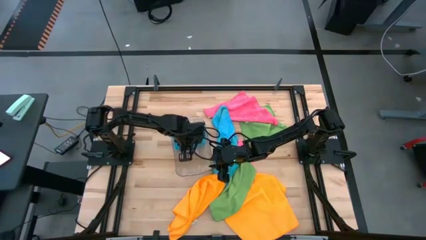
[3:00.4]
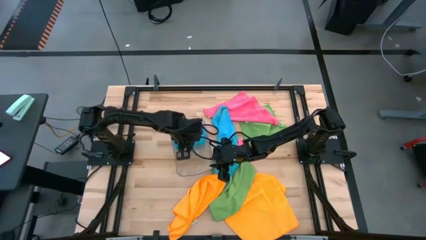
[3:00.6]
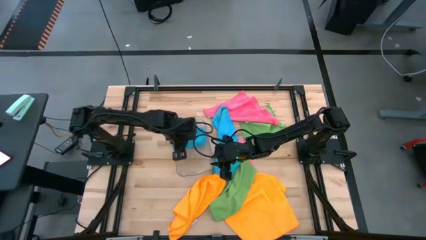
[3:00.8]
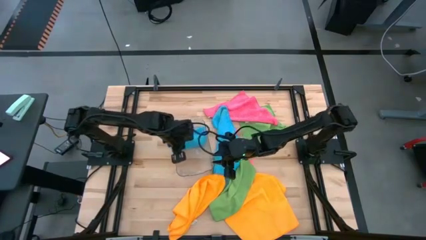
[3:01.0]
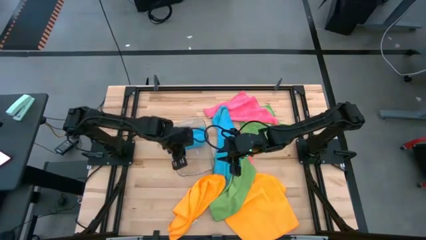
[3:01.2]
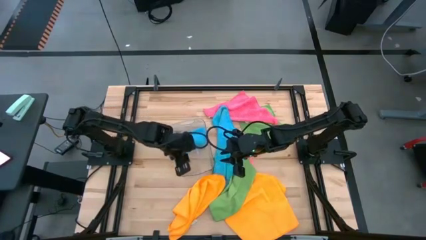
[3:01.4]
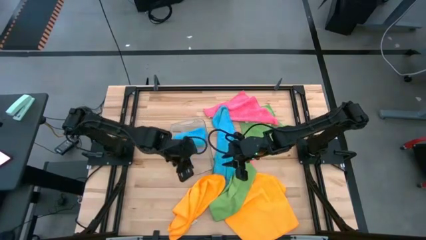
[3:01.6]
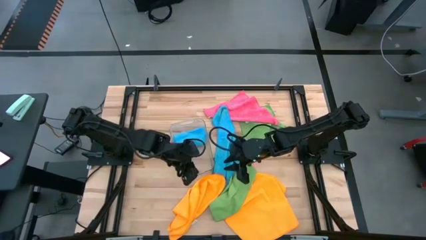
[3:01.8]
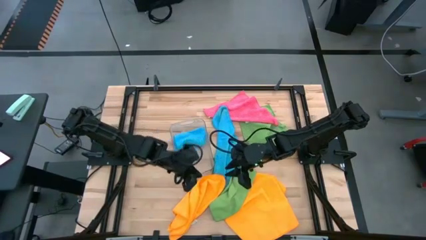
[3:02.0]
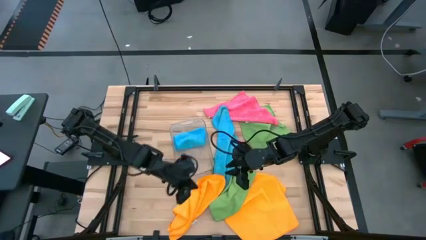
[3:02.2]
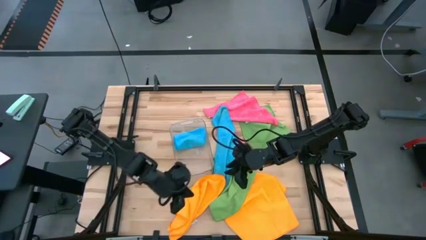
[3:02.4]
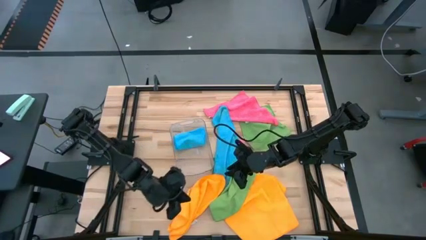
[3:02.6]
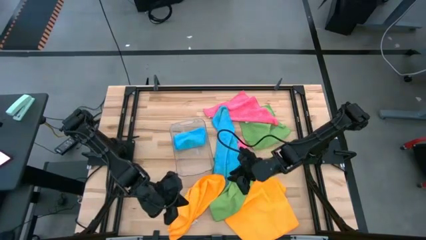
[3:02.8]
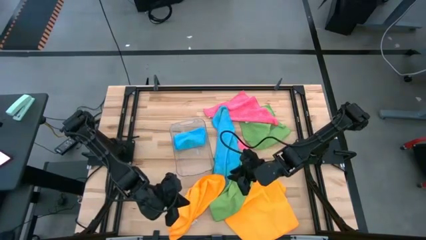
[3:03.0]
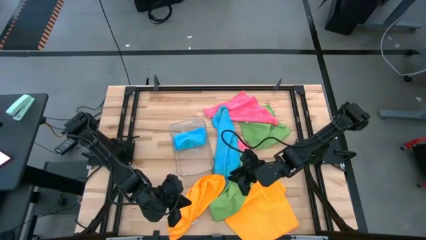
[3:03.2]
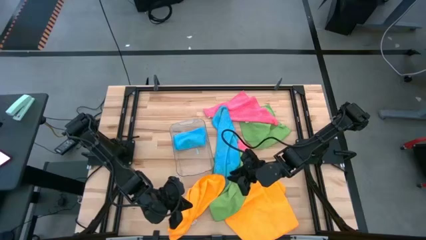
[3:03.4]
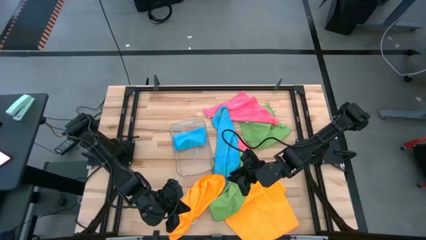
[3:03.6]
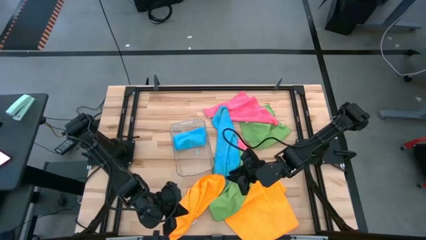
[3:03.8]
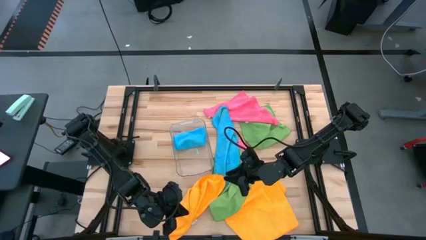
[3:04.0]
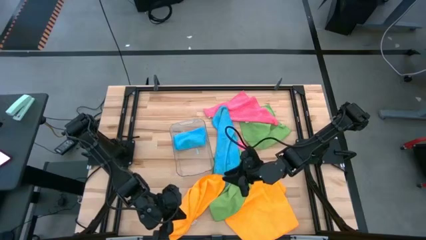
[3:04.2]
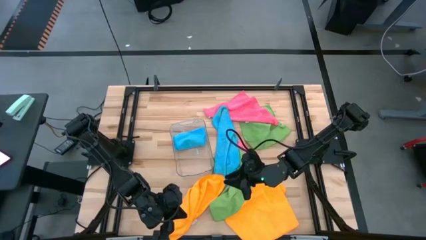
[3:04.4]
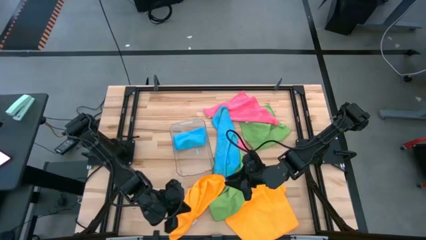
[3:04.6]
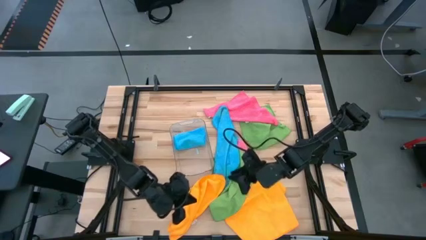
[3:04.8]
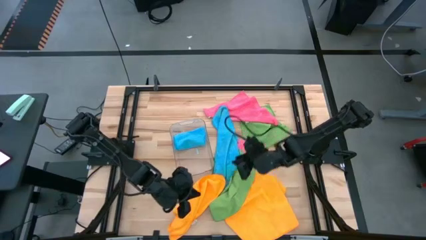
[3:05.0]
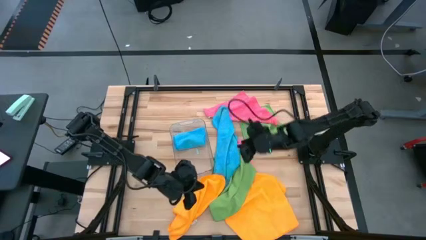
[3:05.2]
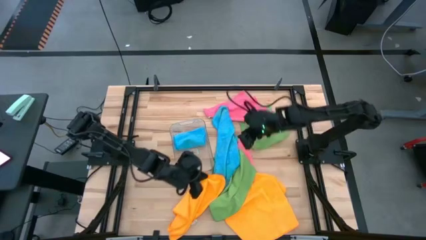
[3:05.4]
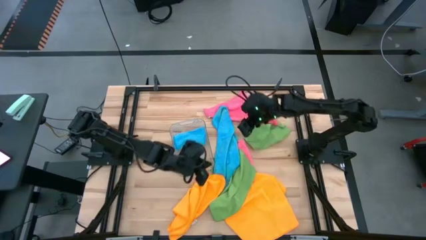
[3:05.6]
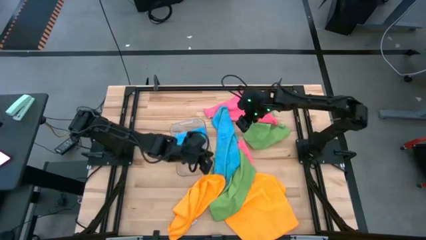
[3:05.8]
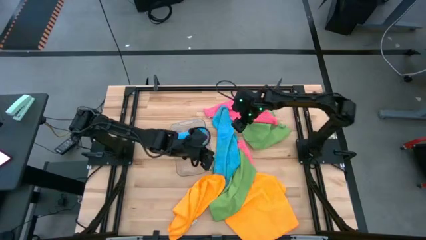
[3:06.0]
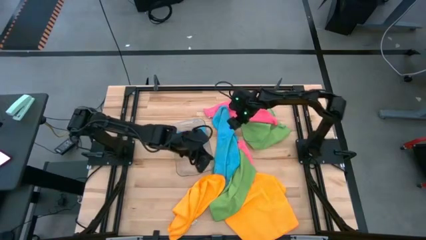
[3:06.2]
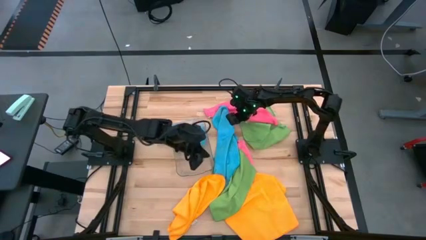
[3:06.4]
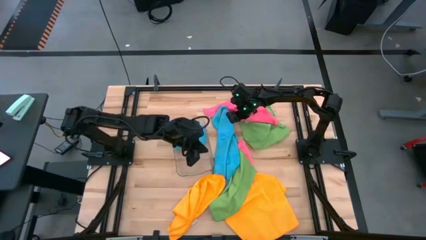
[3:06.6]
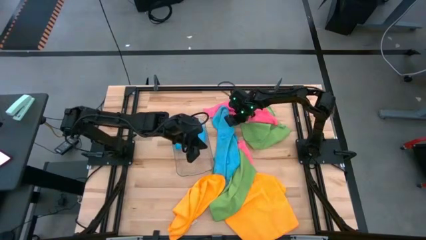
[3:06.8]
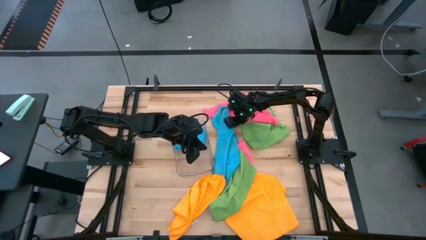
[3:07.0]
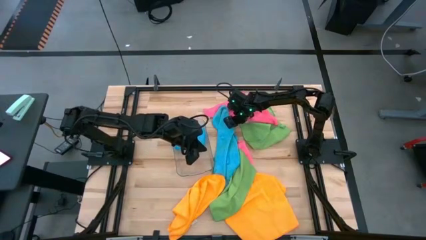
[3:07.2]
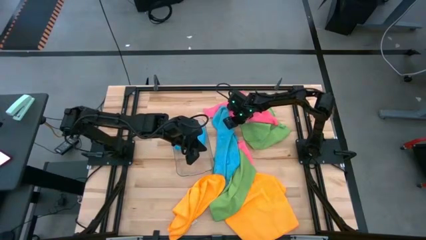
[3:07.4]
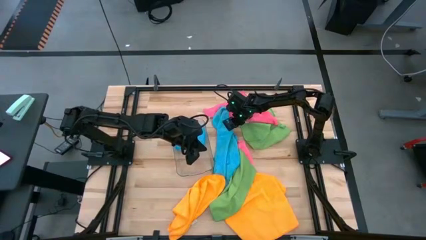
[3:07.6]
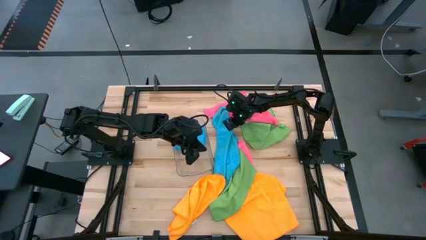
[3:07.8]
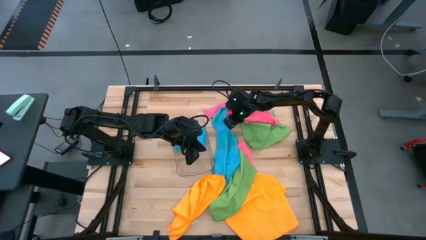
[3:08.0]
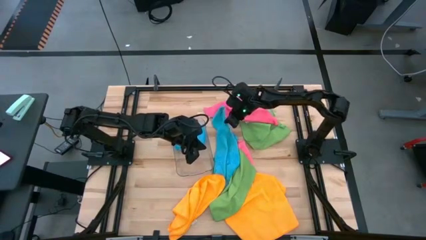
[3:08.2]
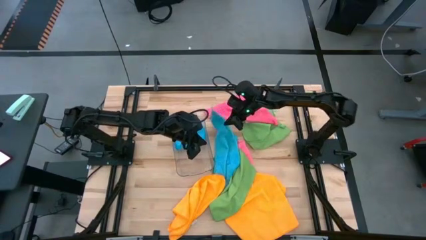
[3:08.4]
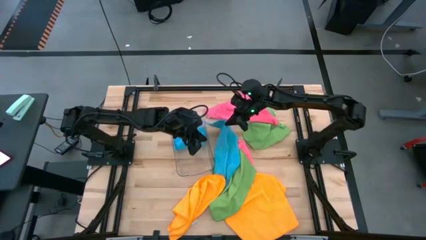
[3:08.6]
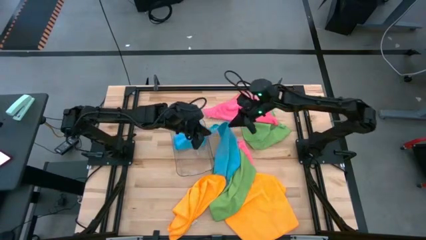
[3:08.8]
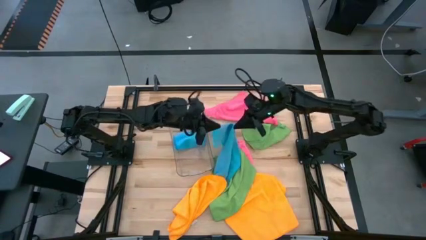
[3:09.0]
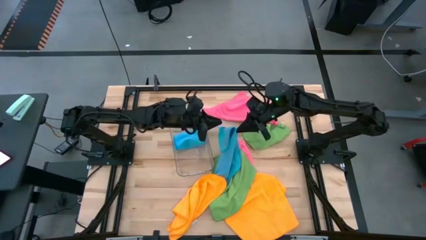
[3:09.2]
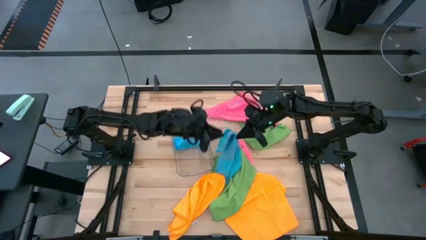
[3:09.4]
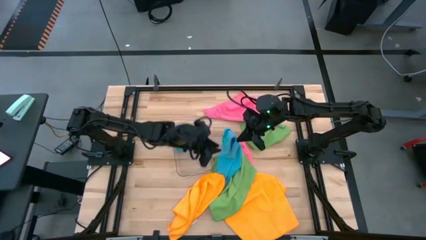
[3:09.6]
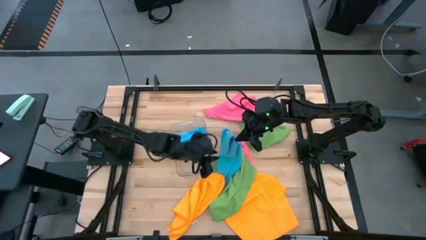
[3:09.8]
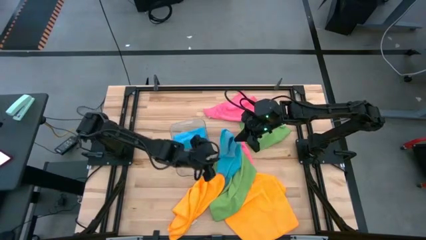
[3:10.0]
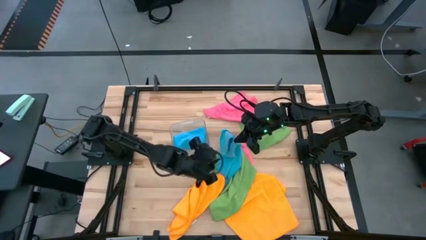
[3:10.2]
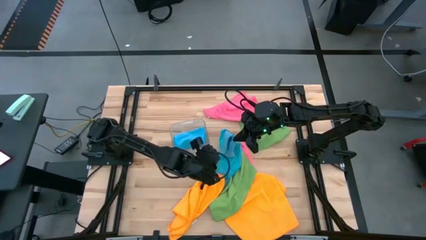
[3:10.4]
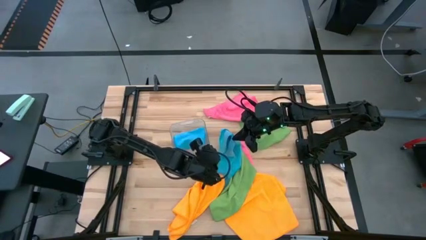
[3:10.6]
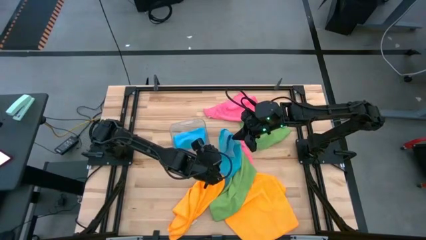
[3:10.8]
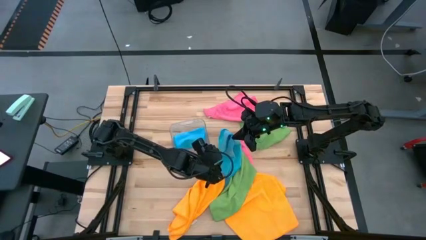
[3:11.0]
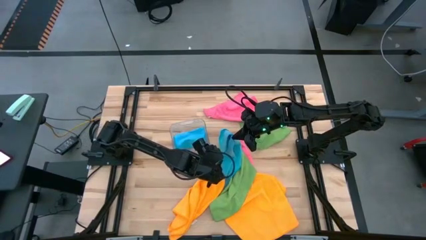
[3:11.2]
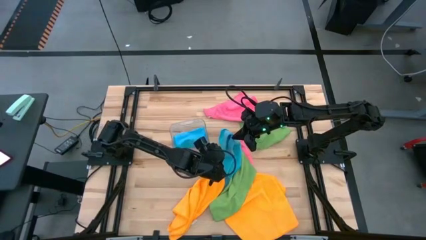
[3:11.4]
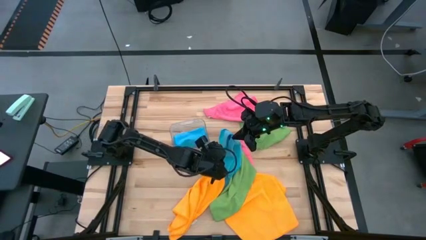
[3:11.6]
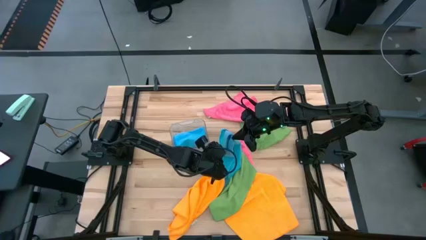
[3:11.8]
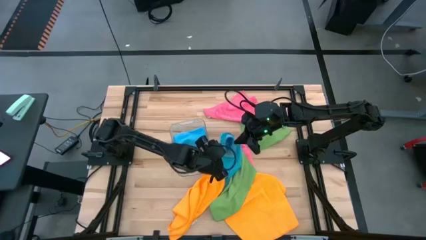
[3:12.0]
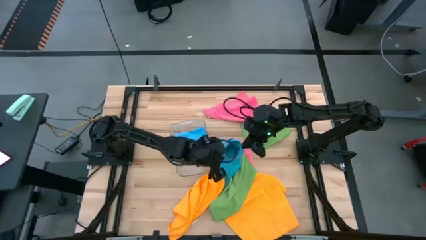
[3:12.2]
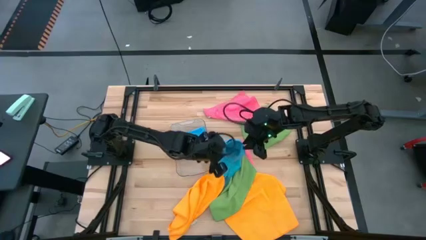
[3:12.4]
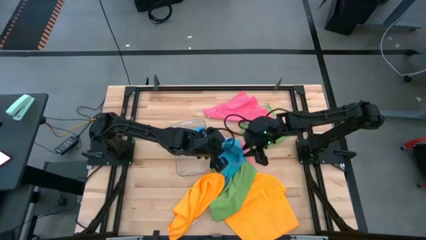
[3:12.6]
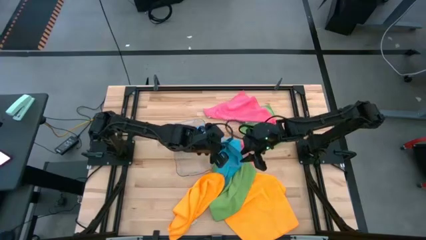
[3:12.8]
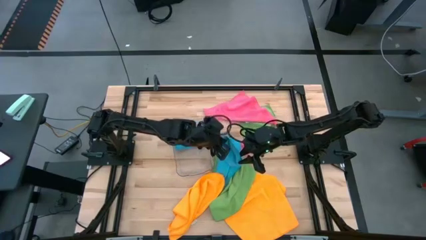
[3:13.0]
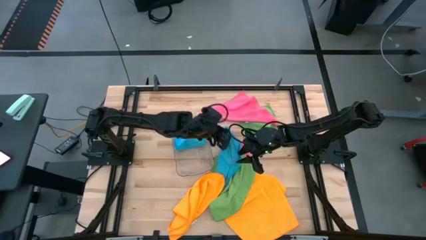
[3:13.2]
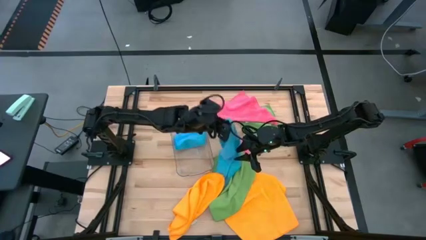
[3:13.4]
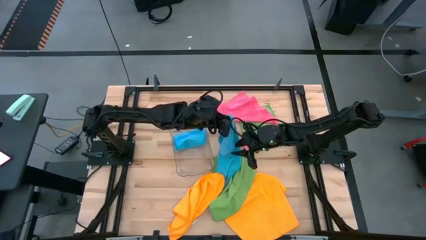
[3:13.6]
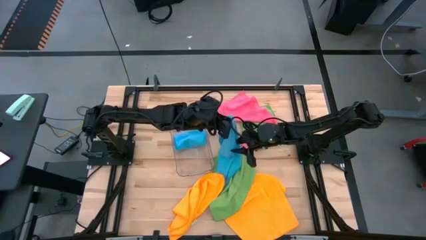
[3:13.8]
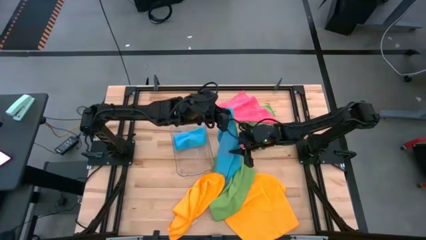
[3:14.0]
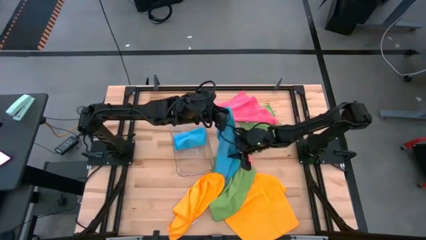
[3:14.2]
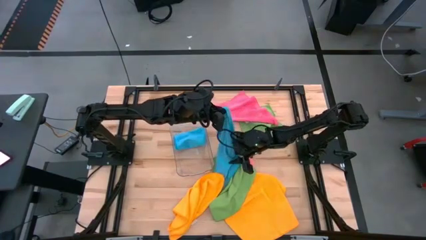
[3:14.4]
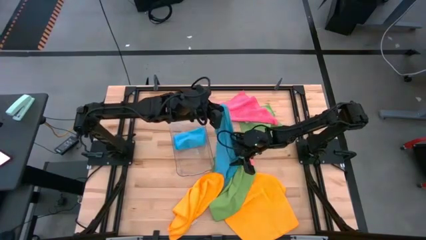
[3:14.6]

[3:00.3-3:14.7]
Task: Fold microfiber towels
Fold the blue towel
